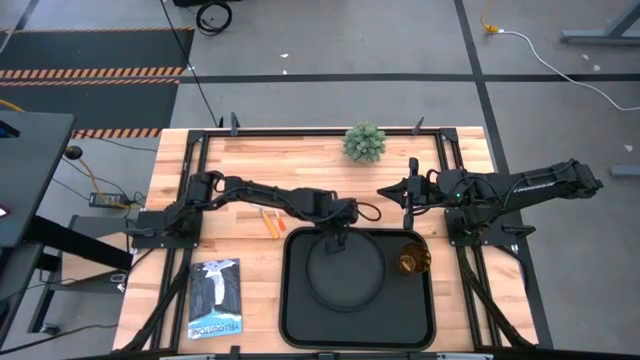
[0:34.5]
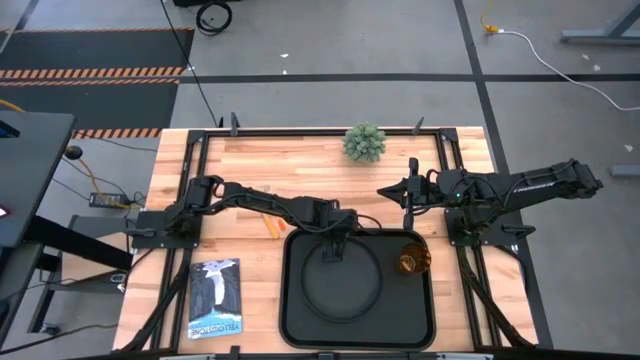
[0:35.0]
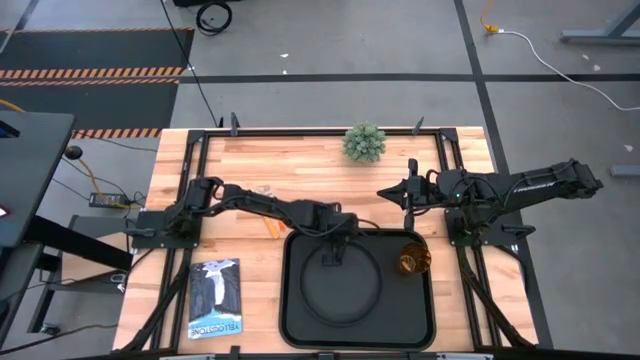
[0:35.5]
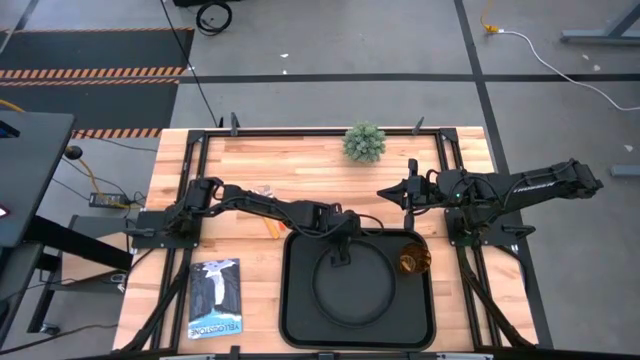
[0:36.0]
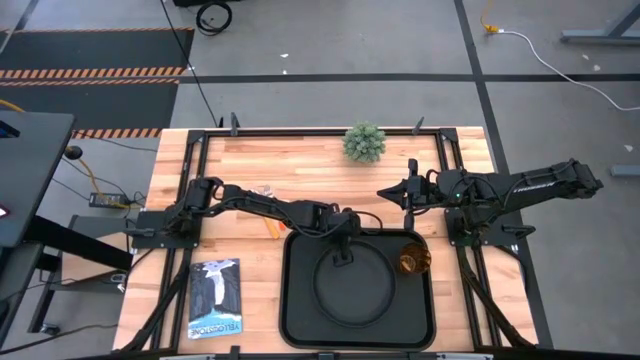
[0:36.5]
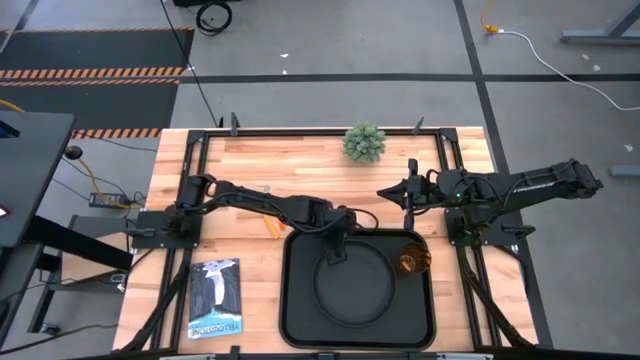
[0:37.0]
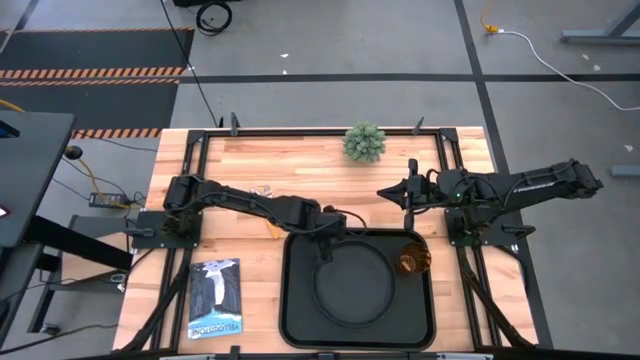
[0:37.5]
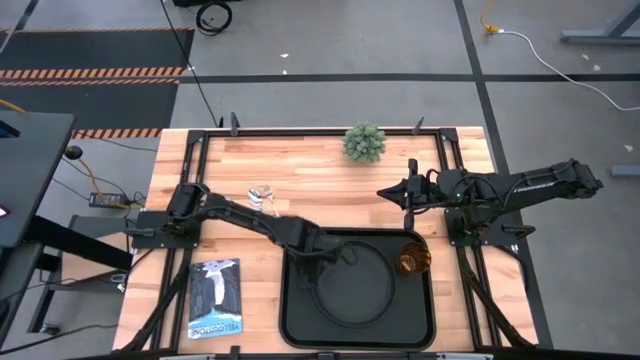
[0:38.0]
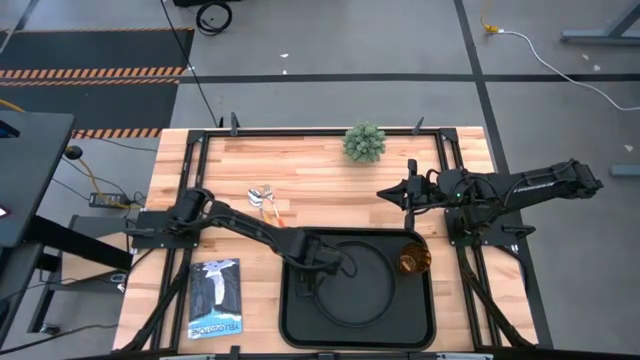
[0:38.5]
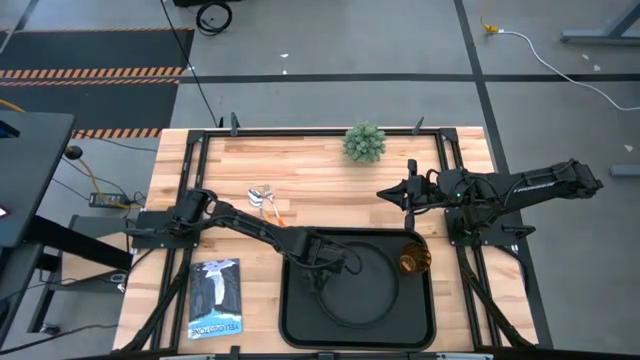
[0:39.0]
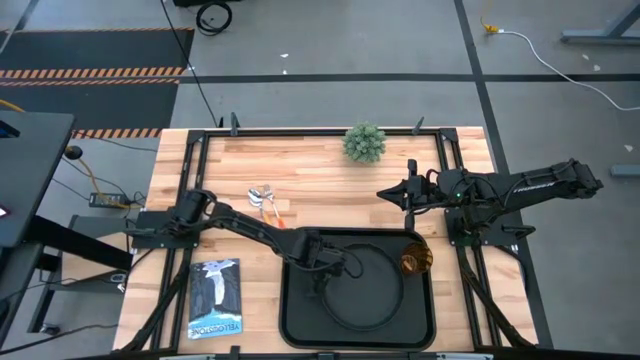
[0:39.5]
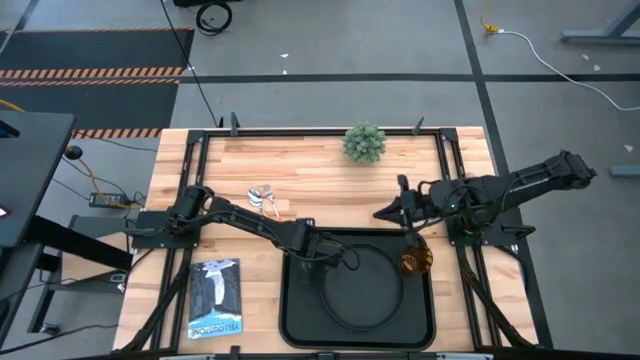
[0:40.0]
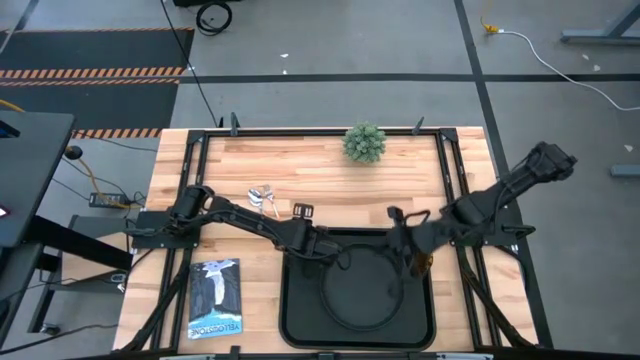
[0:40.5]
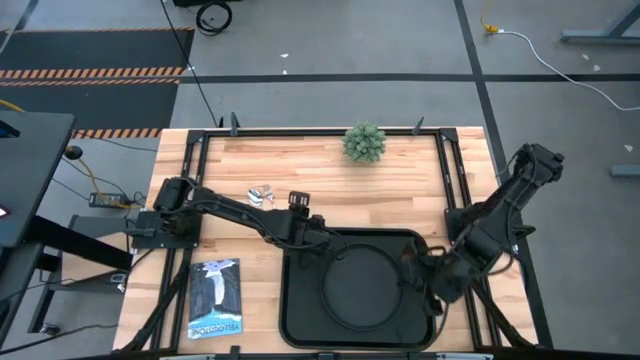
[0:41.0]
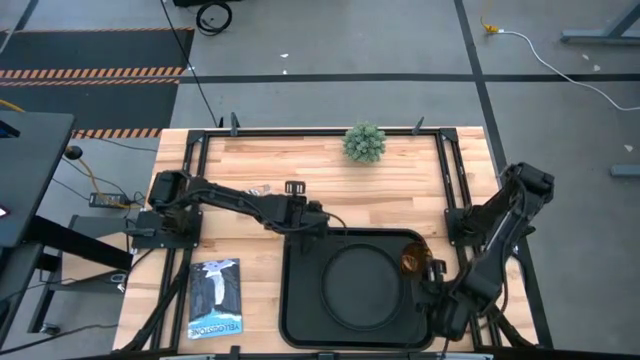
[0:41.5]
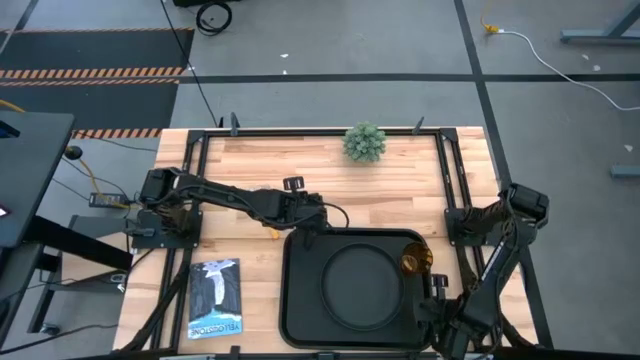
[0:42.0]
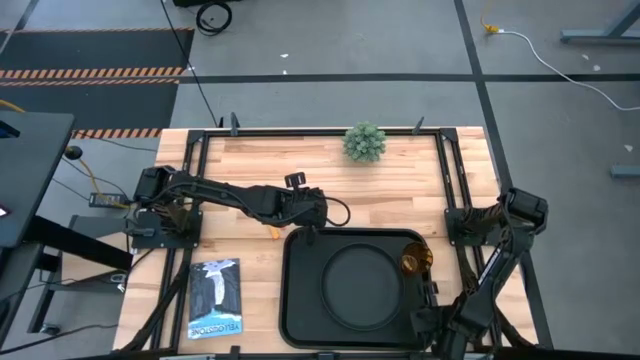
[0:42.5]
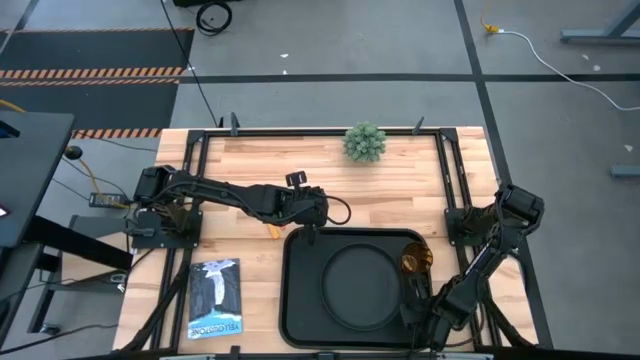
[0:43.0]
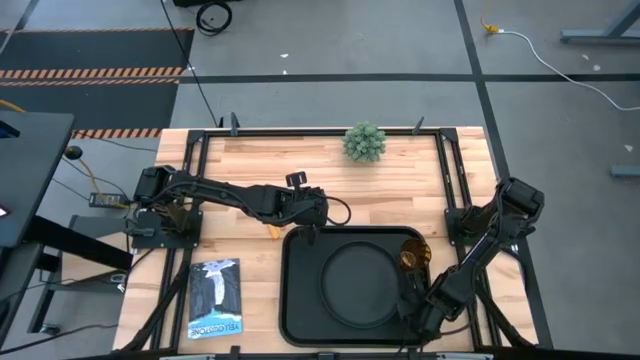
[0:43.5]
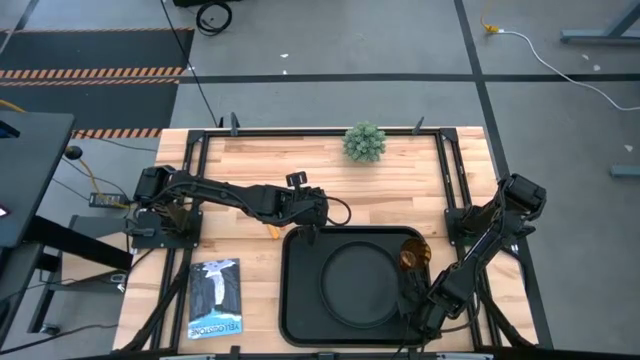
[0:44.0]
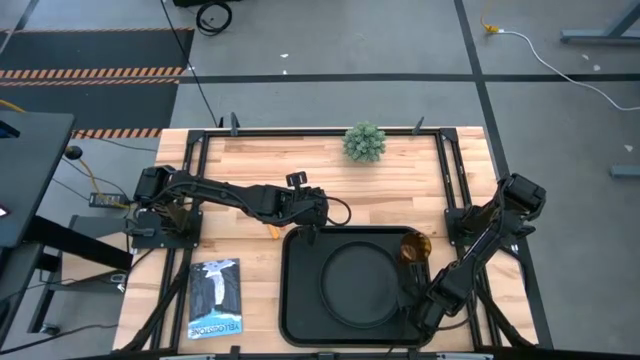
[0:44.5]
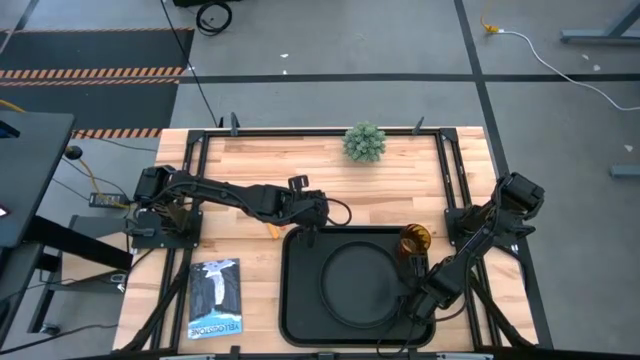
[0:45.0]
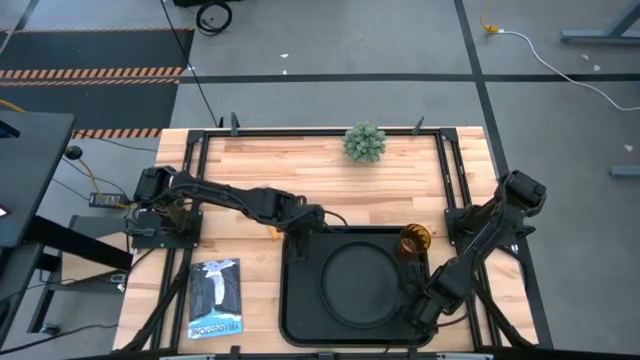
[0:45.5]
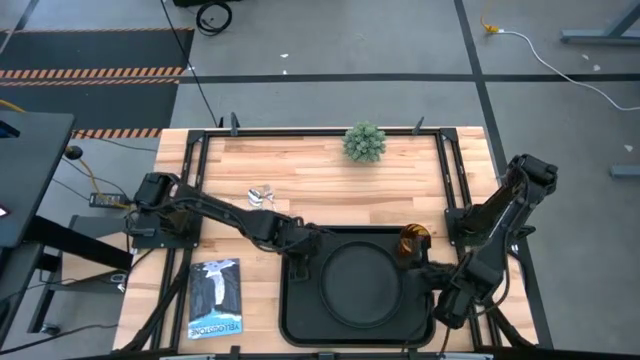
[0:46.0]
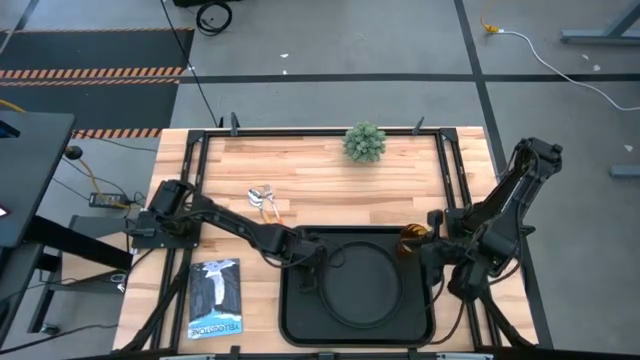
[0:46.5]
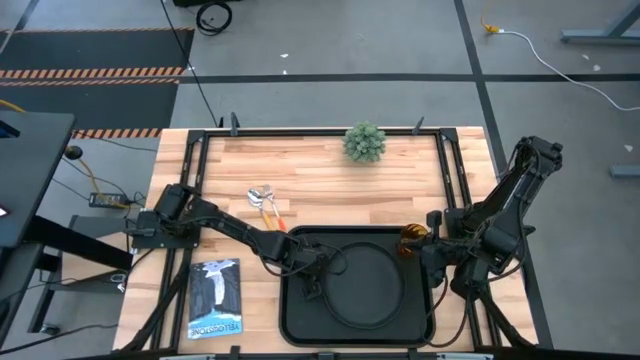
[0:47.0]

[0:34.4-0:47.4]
Task: Pick and place plate/cup/fork/spoon on tray
Put the black plate to the bottom left of the brown cup on the black tray
